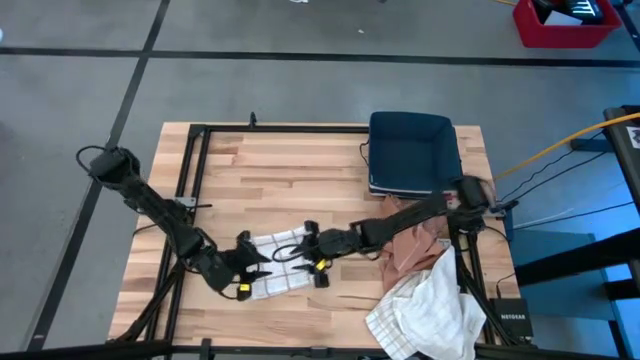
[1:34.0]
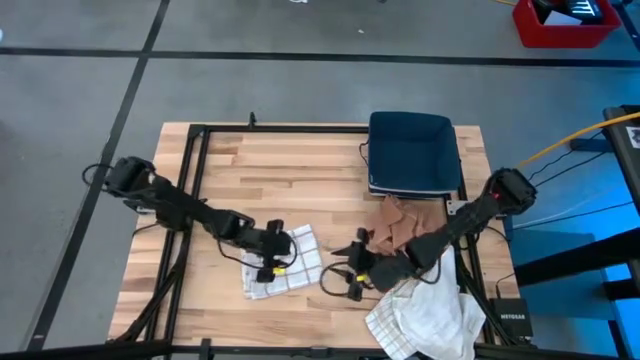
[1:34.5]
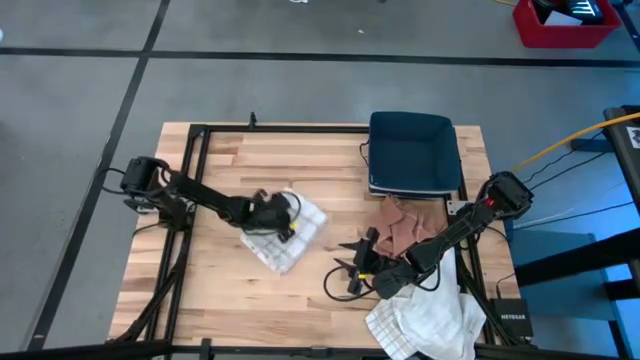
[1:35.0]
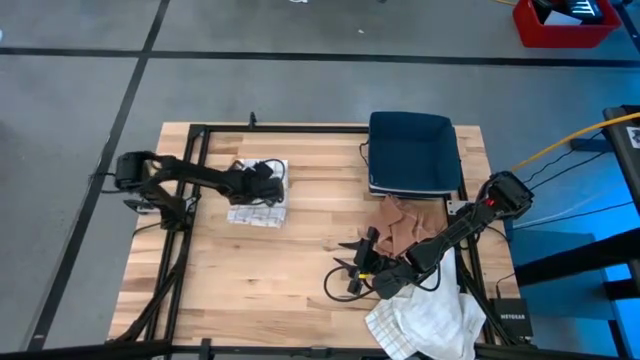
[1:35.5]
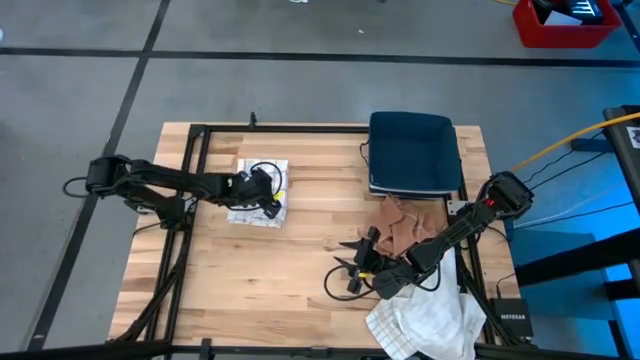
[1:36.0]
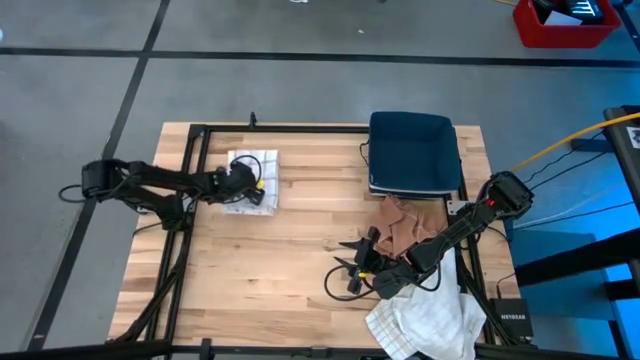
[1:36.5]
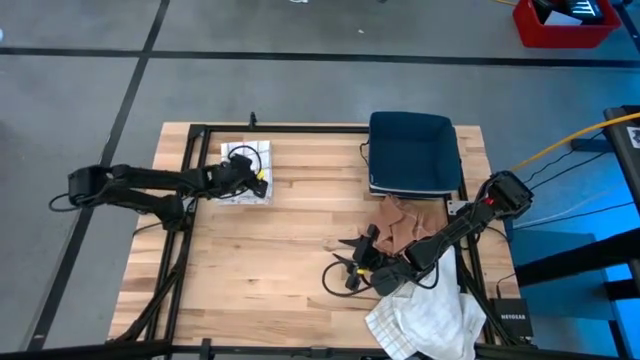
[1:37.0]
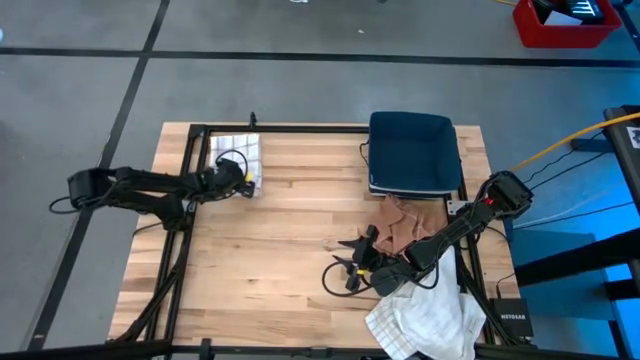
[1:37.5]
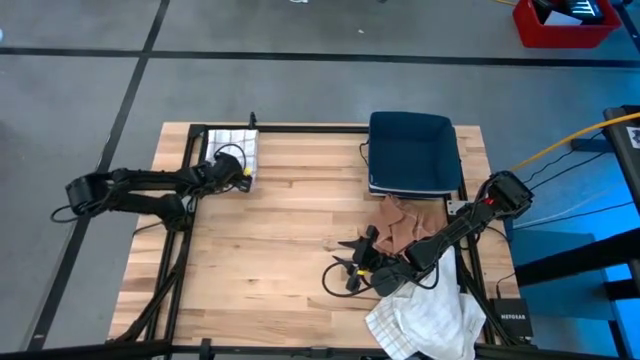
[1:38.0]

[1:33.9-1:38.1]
Task: Fold towel
Move the brown striped towel to the top left of the table

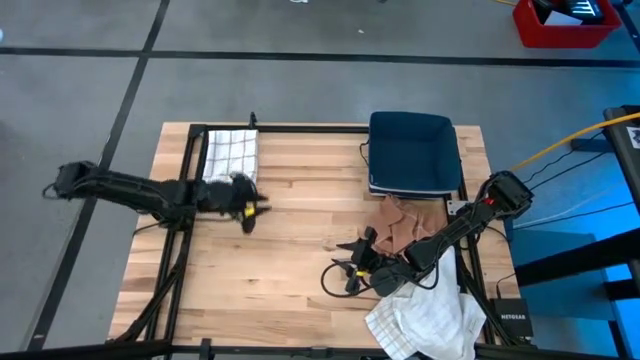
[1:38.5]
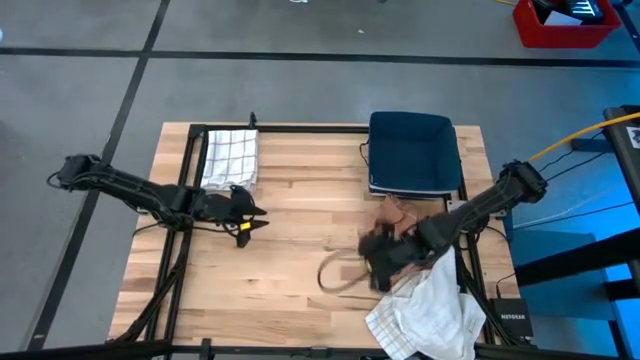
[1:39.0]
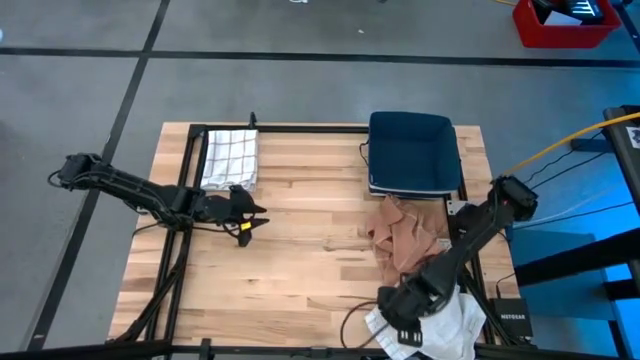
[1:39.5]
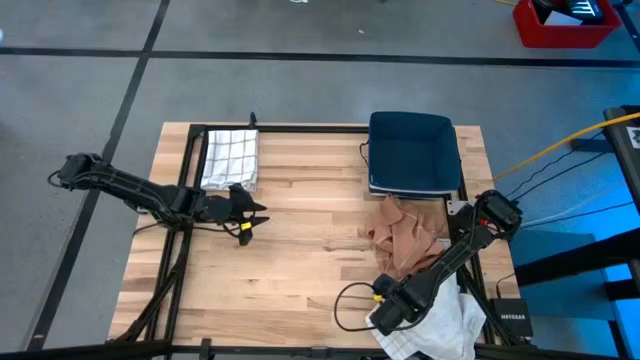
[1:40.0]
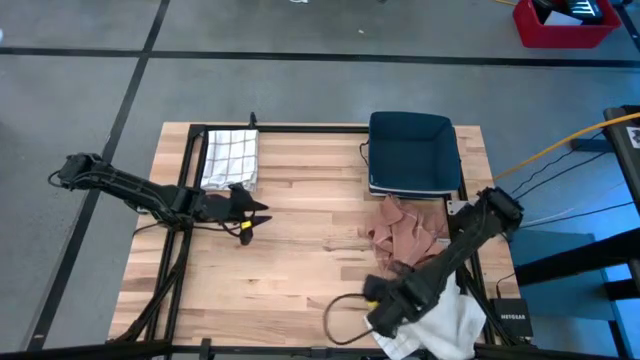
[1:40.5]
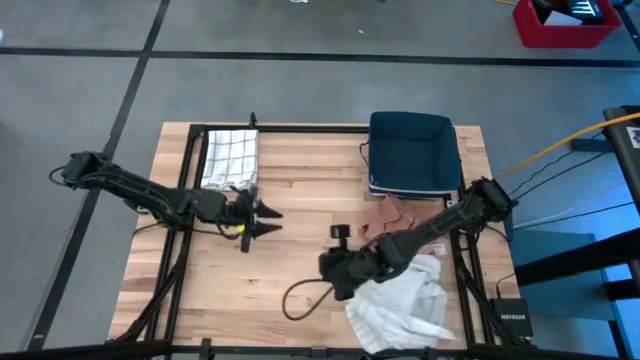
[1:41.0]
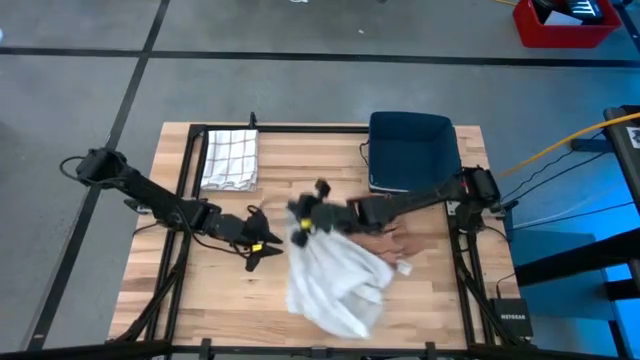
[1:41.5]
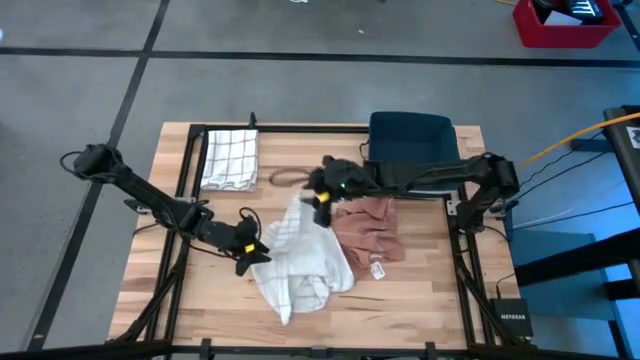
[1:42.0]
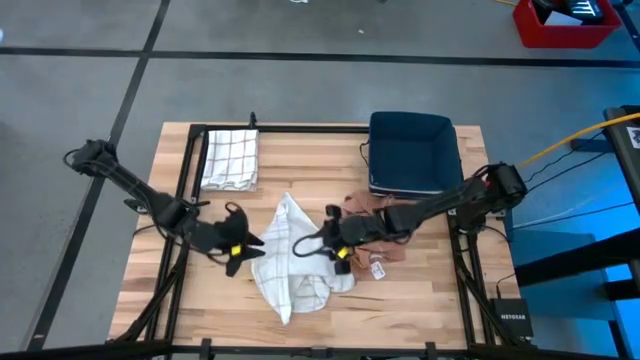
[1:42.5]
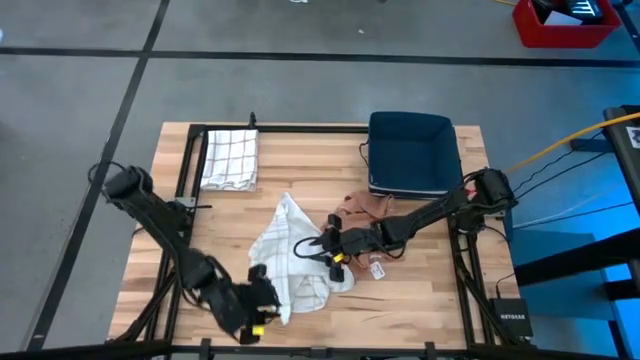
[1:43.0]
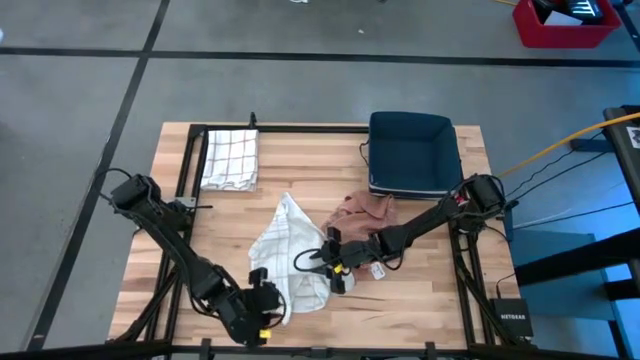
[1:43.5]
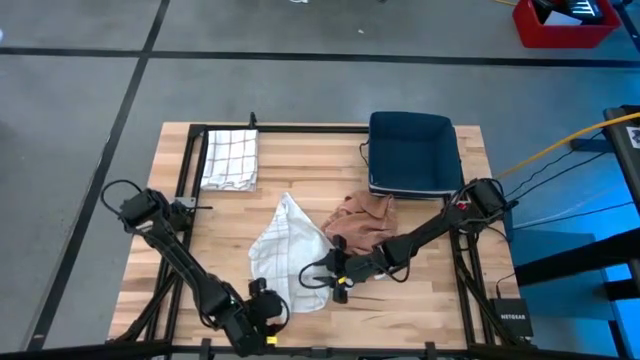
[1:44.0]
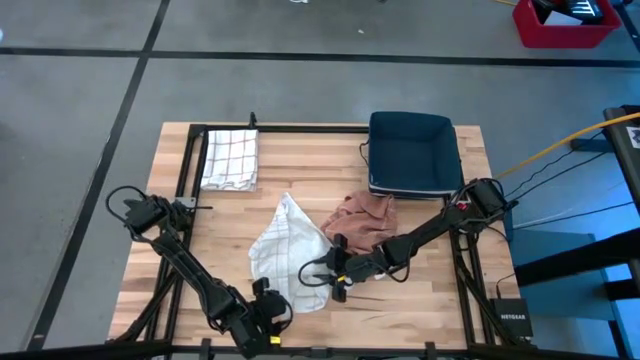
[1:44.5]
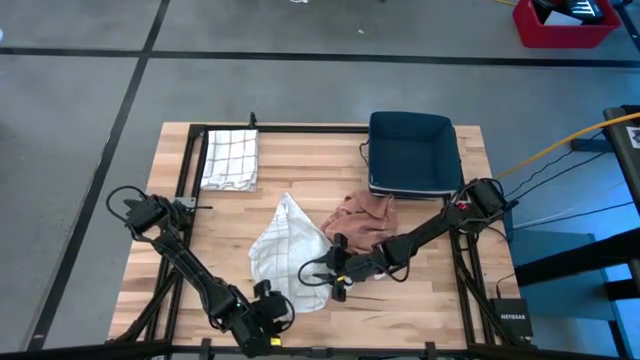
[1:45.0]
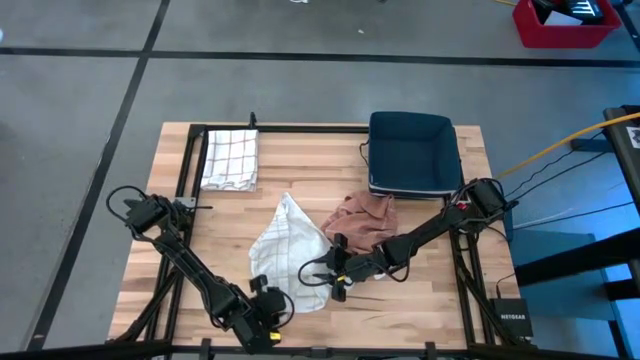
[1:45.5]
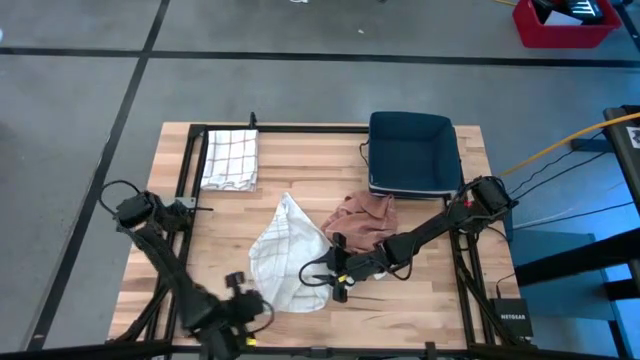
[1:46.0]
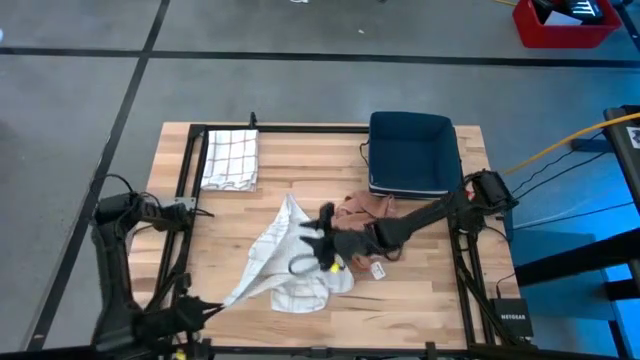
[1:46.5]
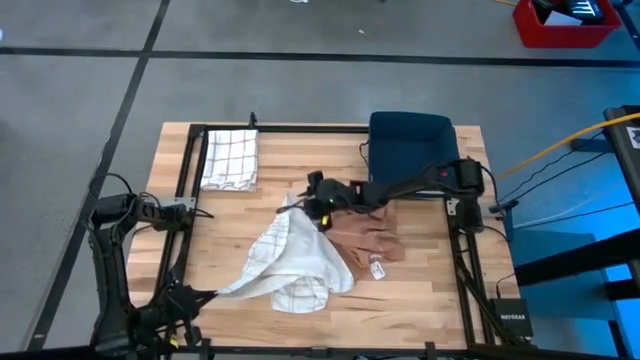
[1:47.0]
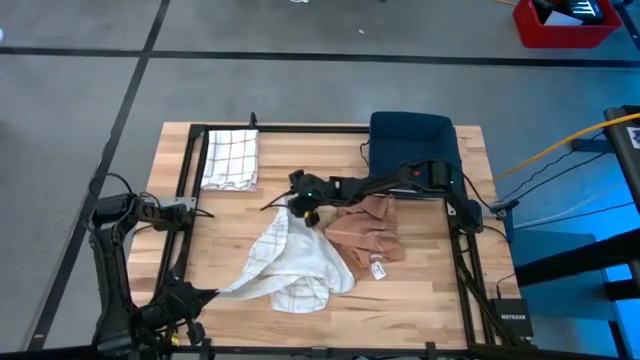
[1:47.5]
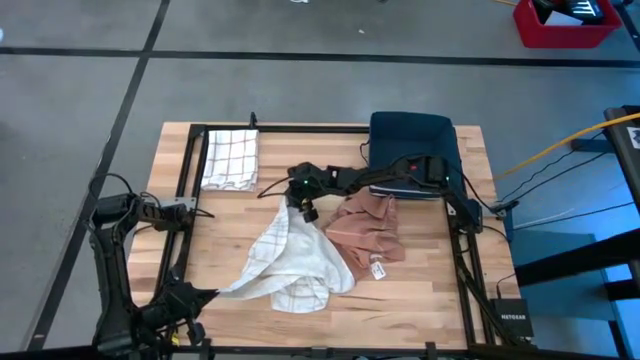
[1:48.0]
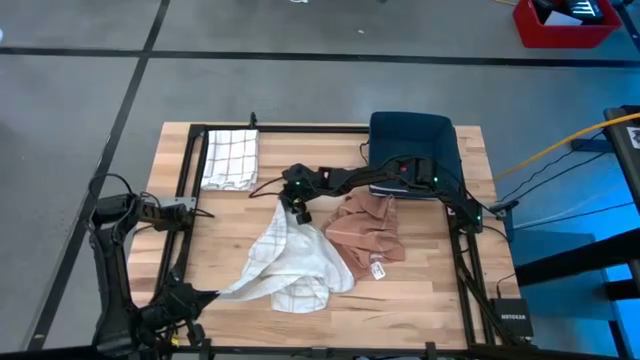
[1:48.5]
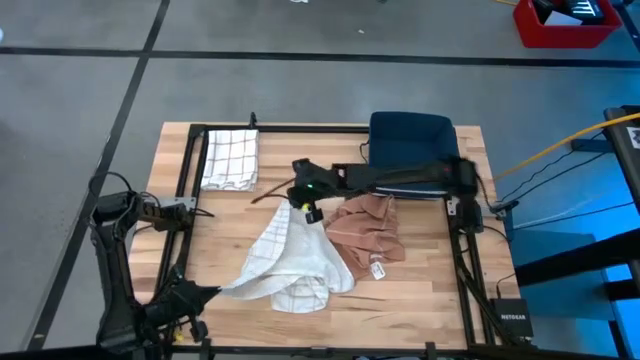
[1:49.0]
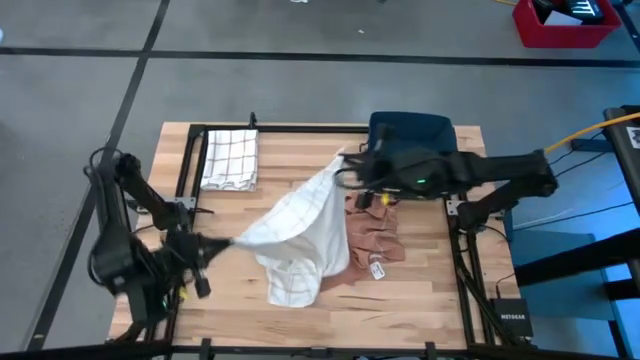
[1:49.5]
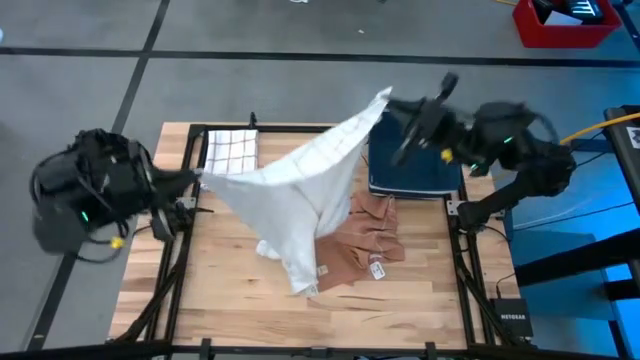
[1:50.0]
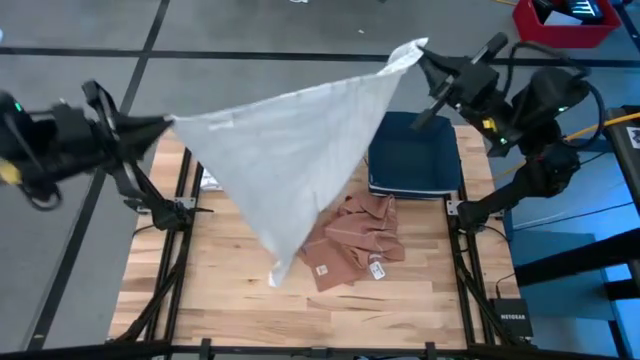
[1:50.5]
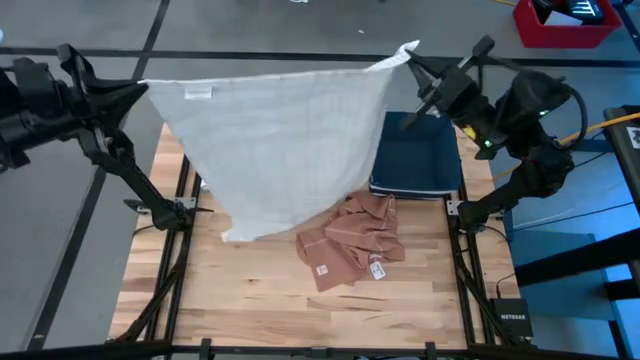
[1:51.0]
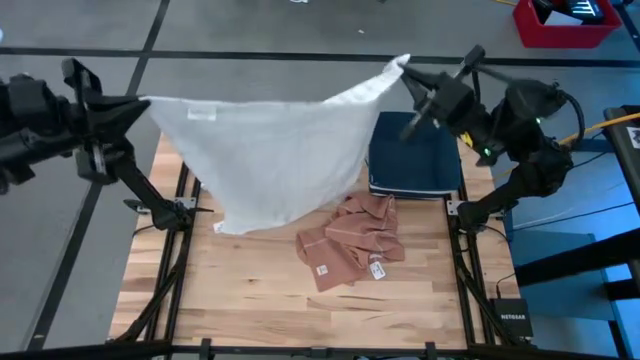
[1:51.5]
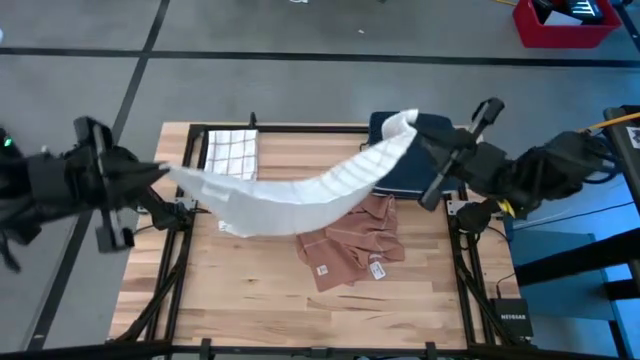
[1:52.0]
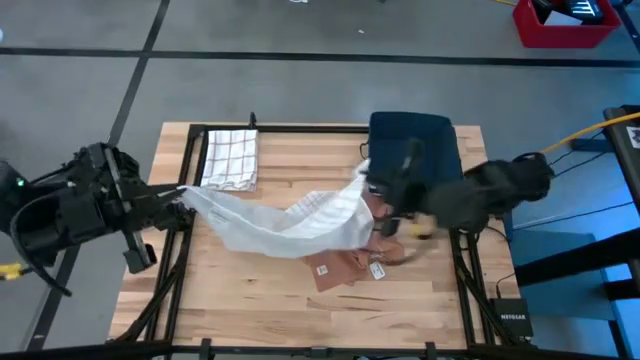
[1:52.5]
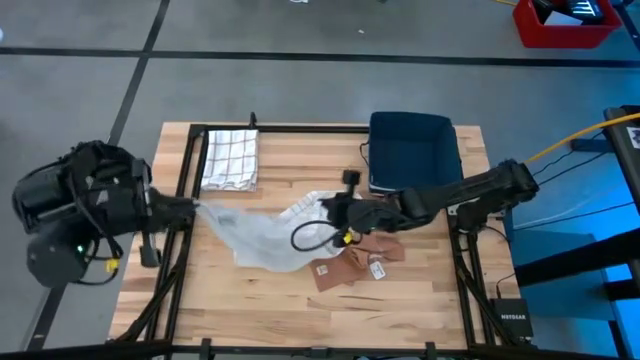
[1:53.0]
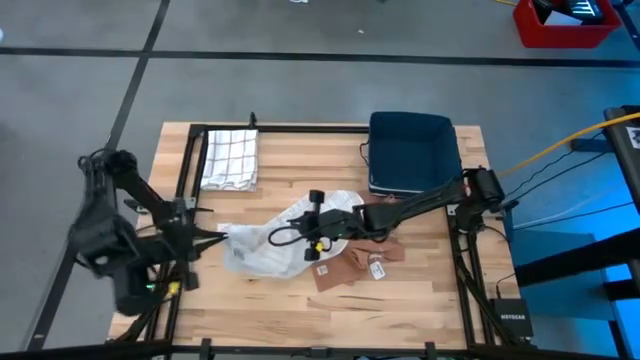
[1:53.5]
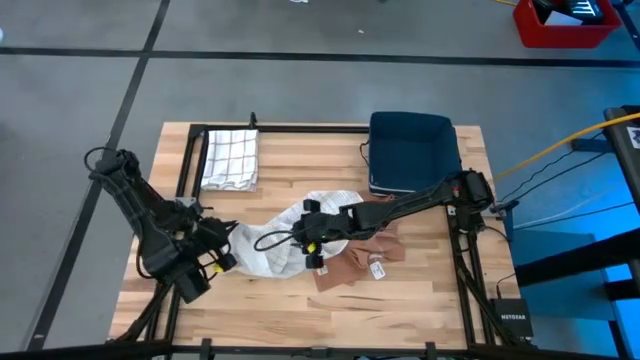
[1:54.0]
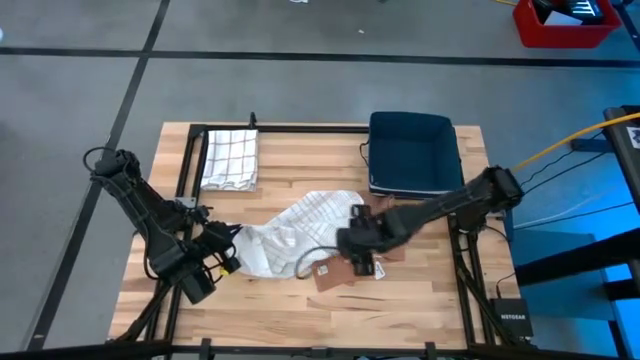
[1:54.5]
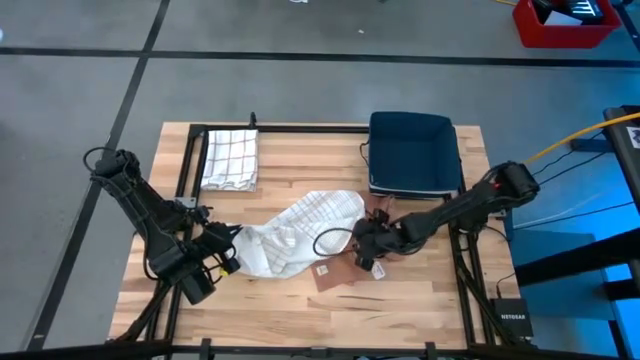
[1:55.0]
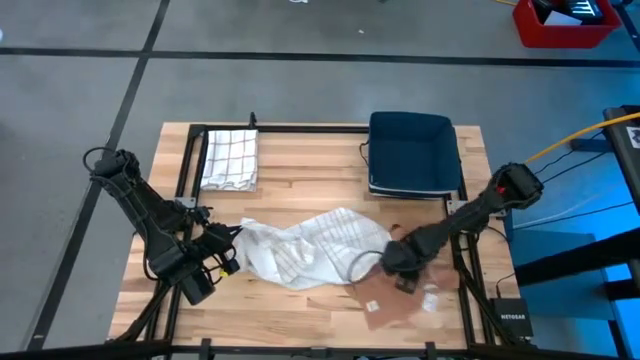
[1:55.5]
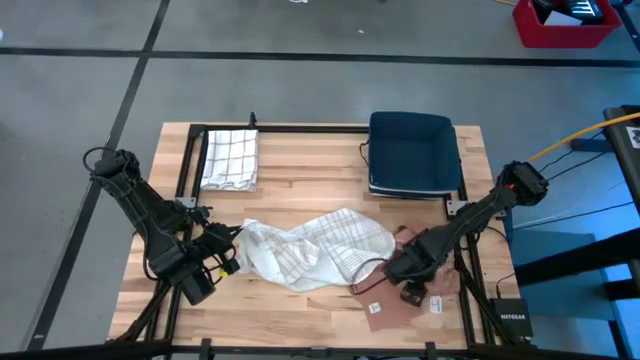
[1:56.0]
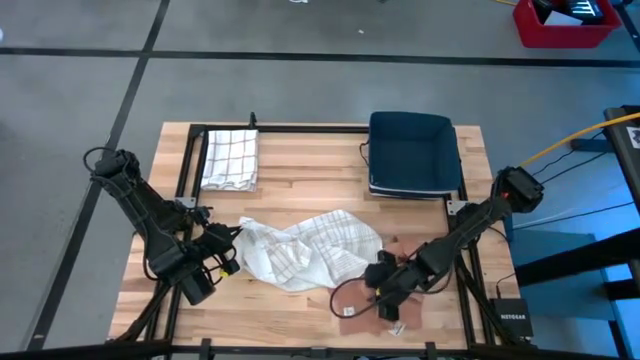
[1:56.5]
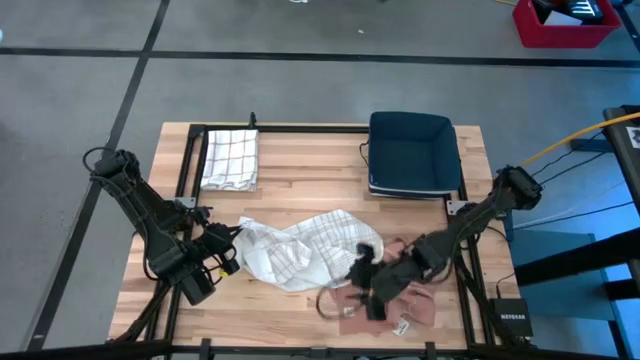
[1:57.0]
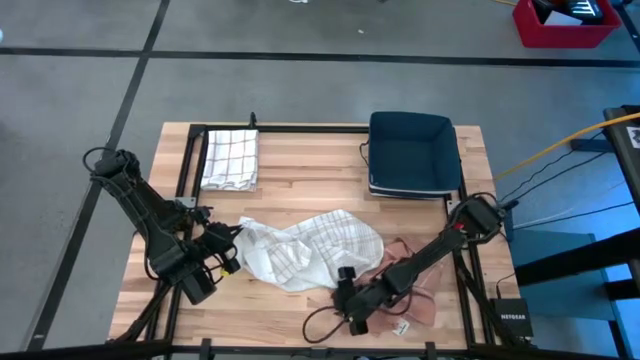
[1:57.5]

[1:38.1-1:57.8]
Fold the white towel on the table
